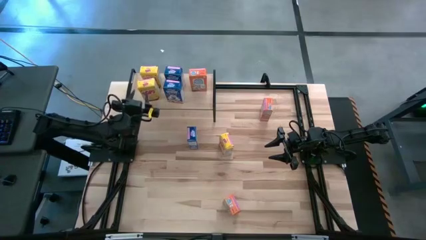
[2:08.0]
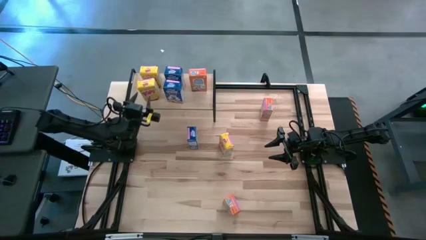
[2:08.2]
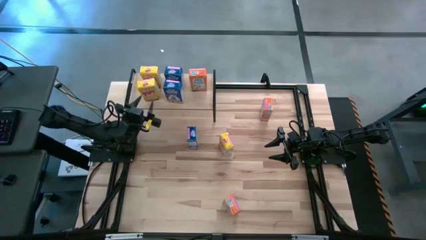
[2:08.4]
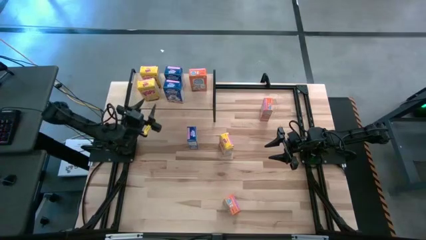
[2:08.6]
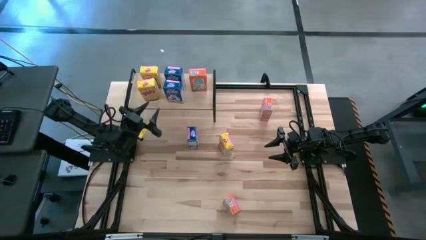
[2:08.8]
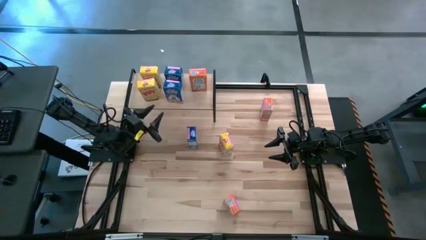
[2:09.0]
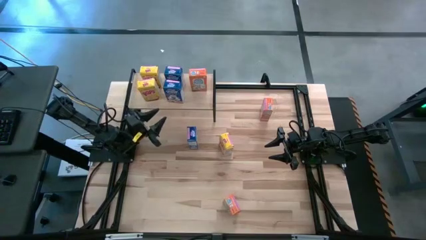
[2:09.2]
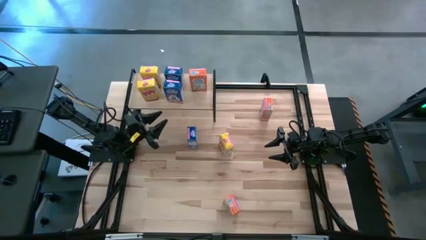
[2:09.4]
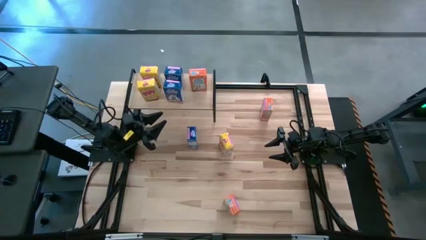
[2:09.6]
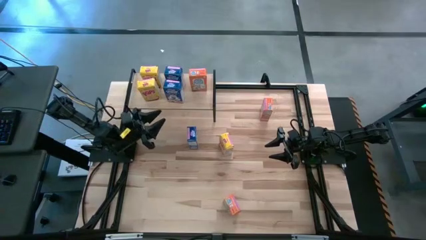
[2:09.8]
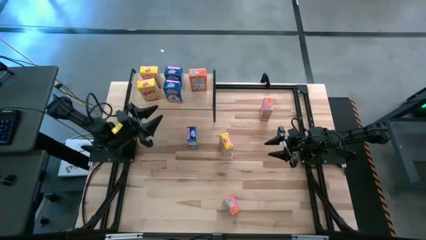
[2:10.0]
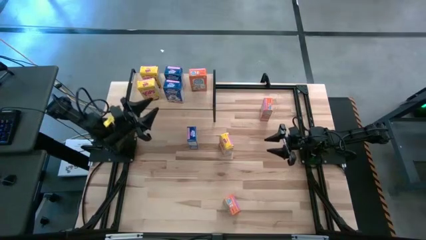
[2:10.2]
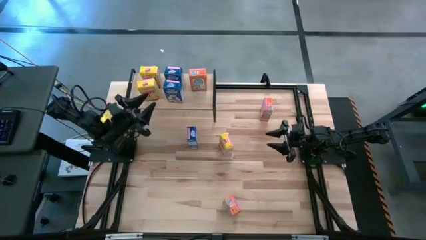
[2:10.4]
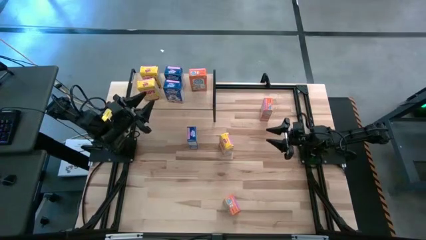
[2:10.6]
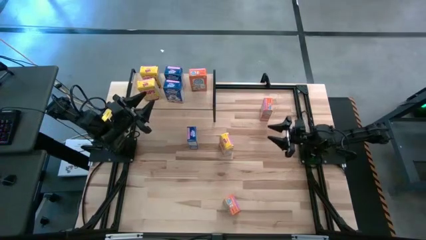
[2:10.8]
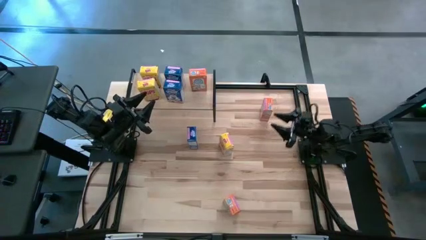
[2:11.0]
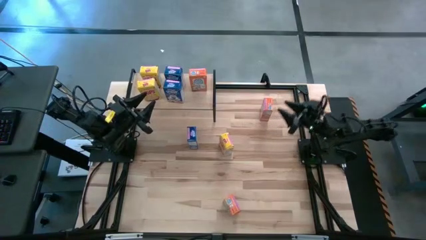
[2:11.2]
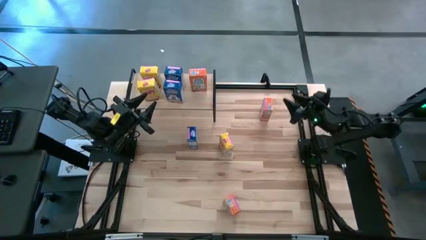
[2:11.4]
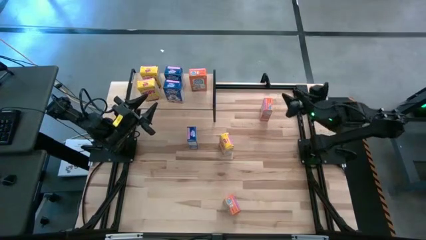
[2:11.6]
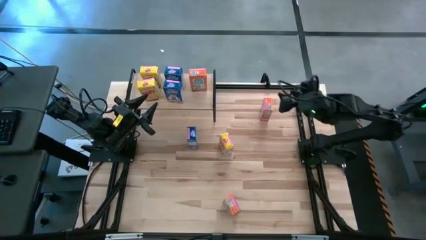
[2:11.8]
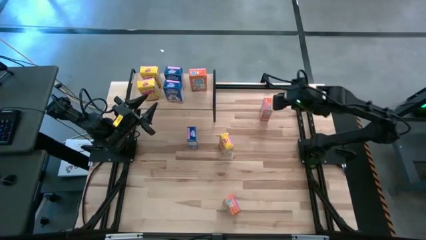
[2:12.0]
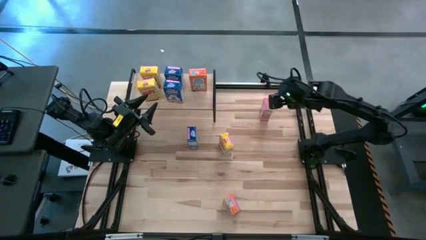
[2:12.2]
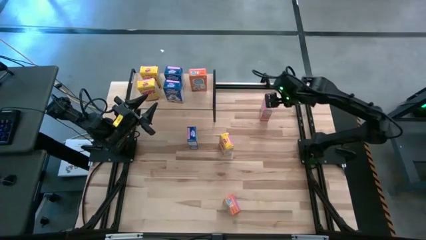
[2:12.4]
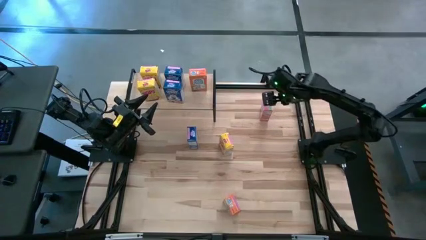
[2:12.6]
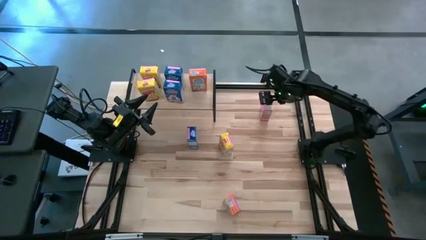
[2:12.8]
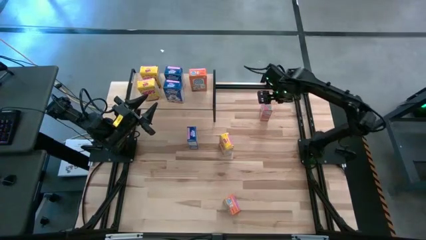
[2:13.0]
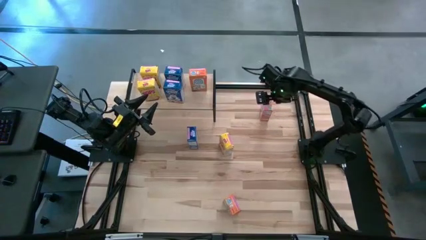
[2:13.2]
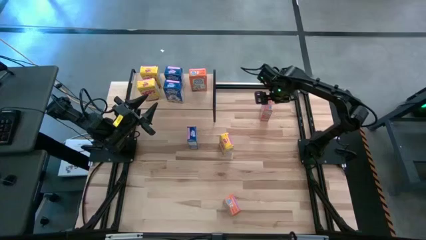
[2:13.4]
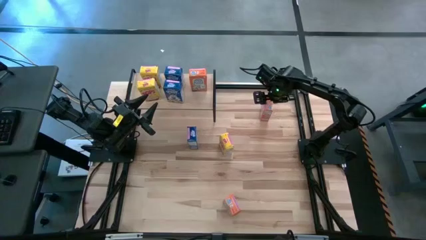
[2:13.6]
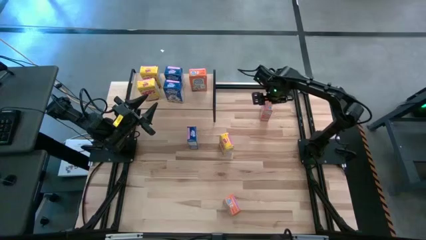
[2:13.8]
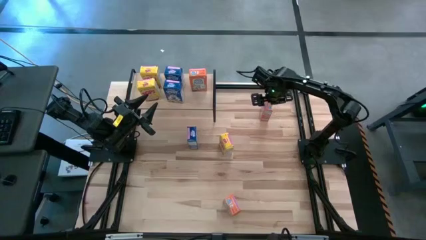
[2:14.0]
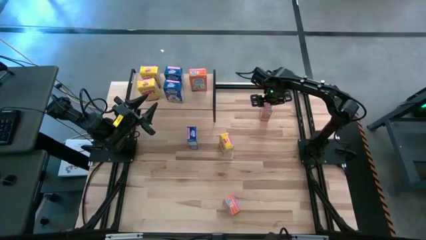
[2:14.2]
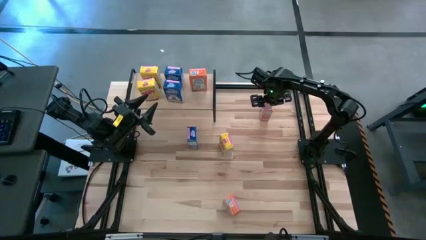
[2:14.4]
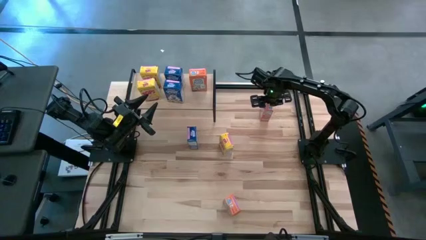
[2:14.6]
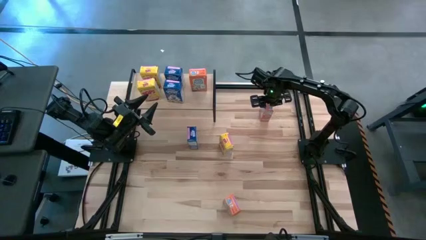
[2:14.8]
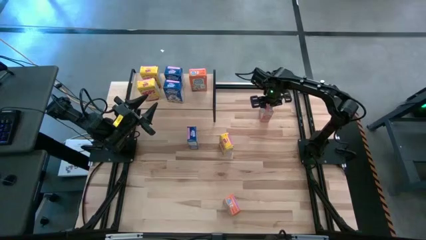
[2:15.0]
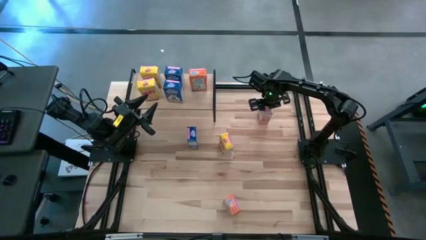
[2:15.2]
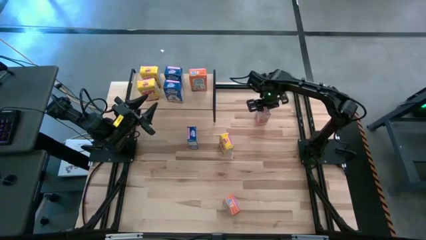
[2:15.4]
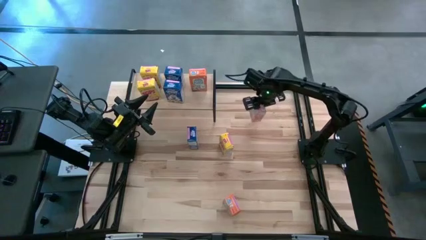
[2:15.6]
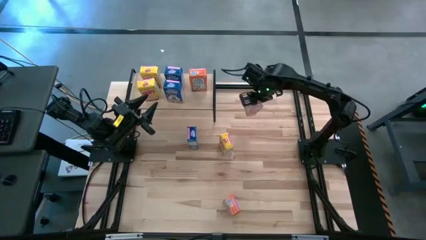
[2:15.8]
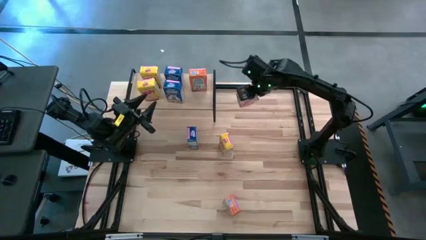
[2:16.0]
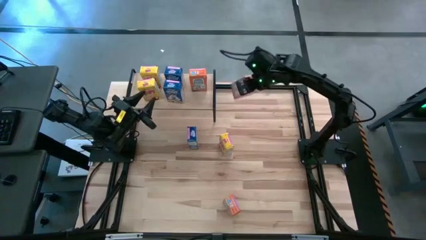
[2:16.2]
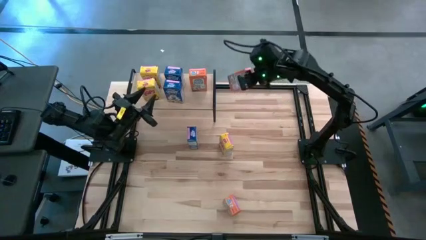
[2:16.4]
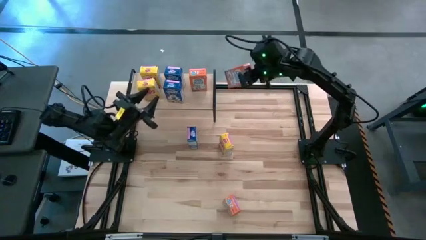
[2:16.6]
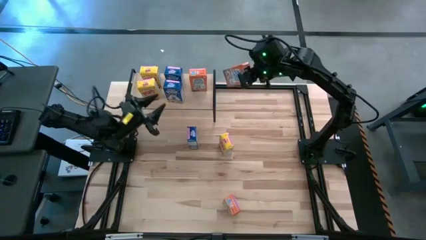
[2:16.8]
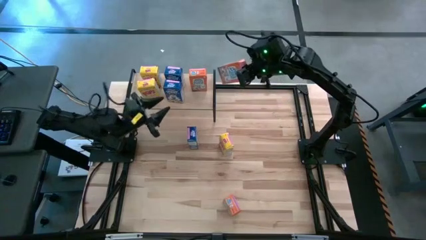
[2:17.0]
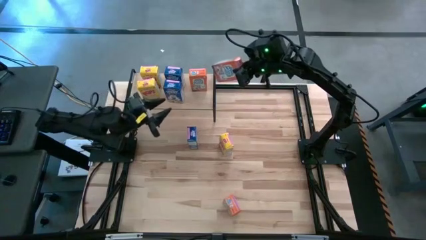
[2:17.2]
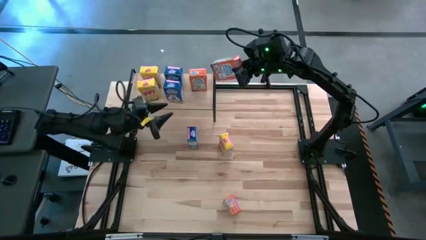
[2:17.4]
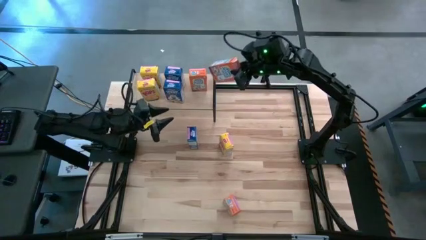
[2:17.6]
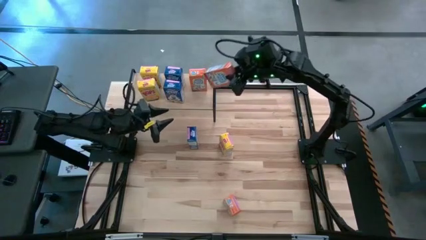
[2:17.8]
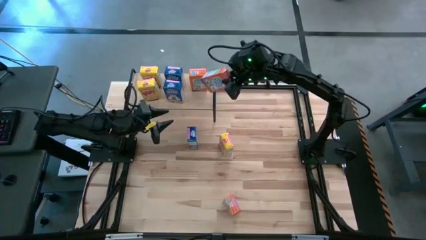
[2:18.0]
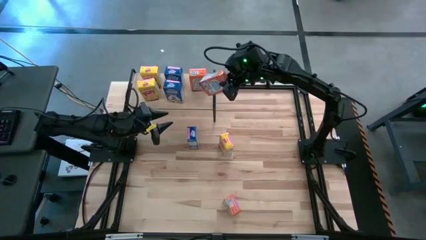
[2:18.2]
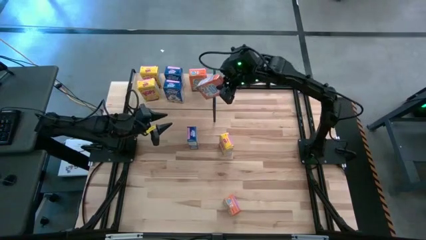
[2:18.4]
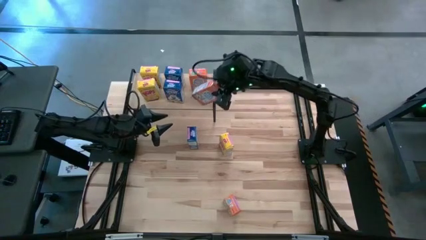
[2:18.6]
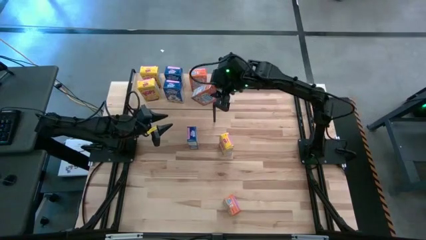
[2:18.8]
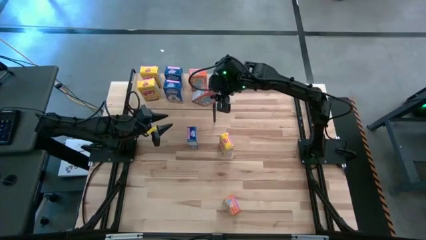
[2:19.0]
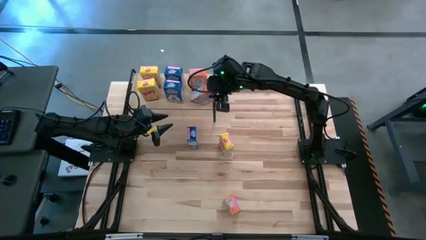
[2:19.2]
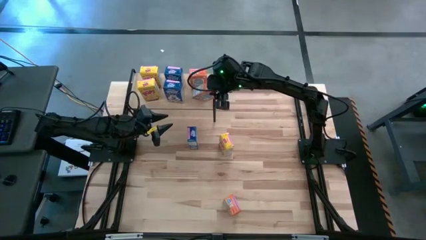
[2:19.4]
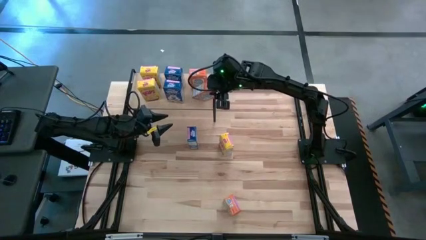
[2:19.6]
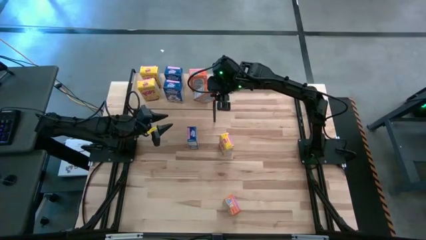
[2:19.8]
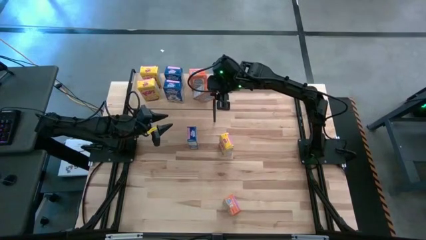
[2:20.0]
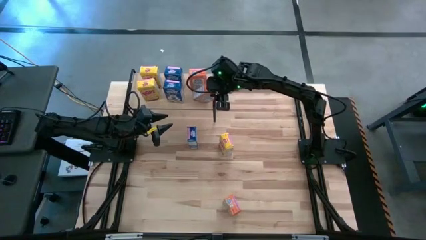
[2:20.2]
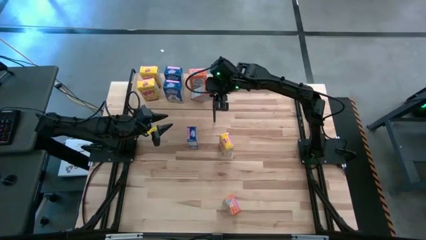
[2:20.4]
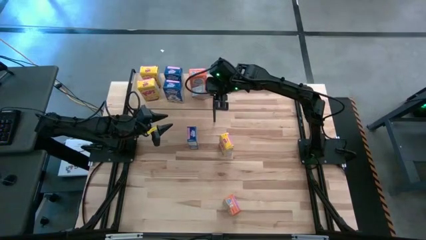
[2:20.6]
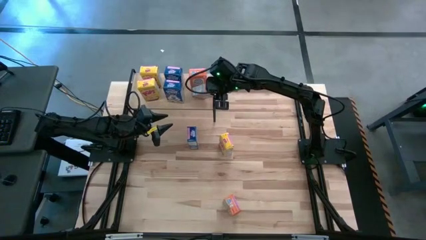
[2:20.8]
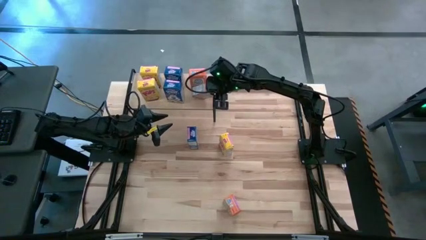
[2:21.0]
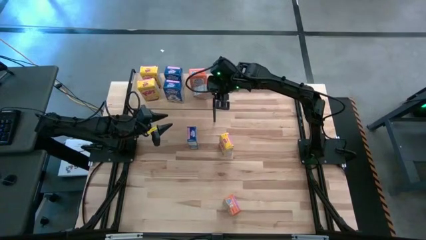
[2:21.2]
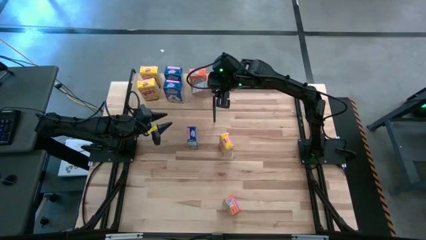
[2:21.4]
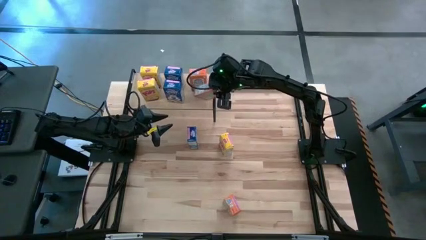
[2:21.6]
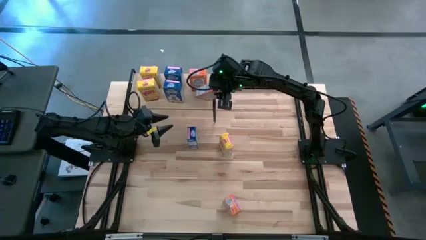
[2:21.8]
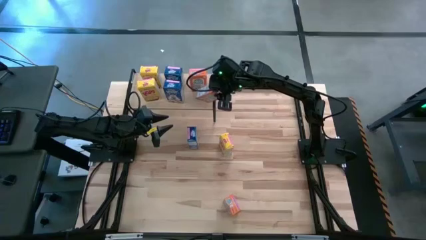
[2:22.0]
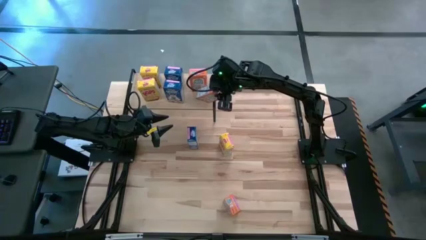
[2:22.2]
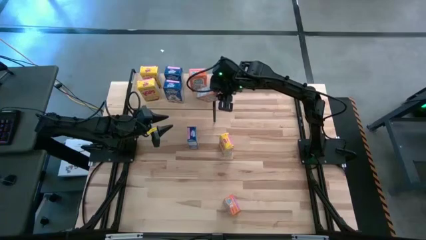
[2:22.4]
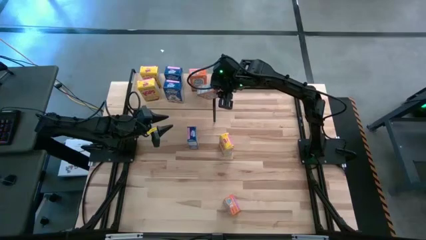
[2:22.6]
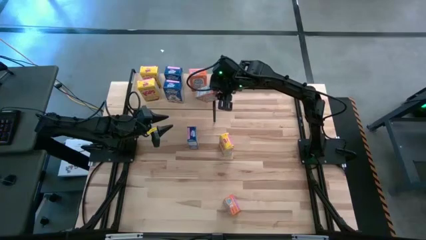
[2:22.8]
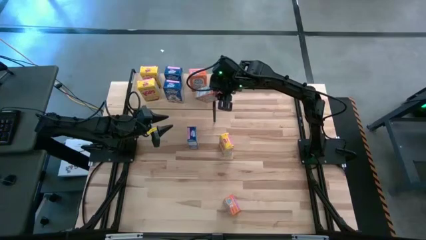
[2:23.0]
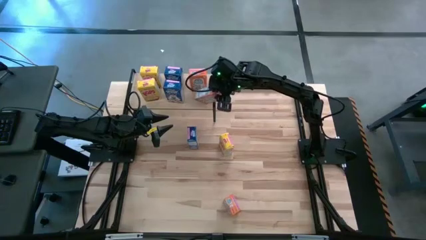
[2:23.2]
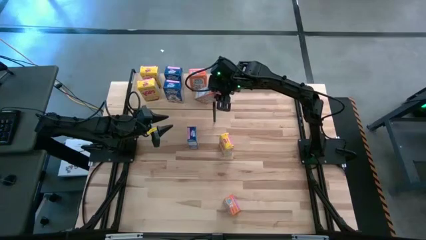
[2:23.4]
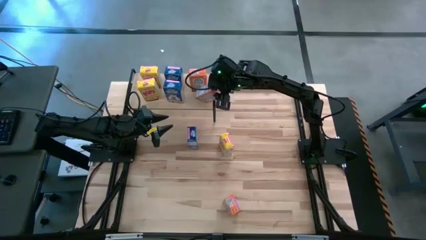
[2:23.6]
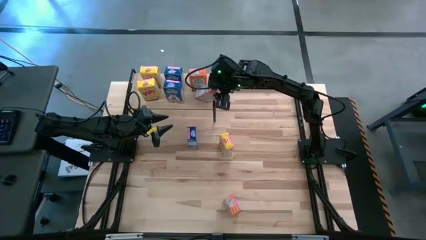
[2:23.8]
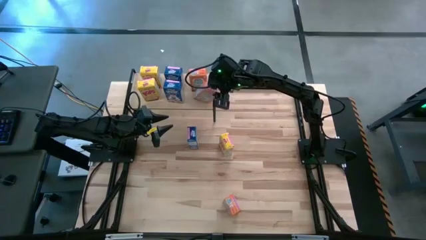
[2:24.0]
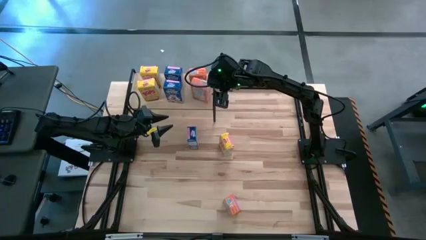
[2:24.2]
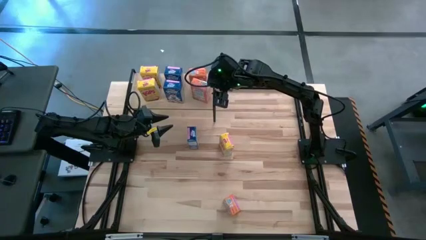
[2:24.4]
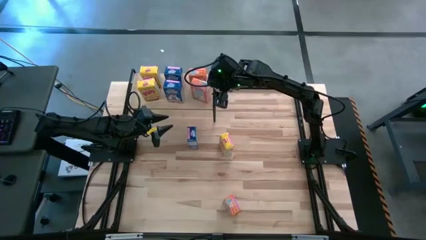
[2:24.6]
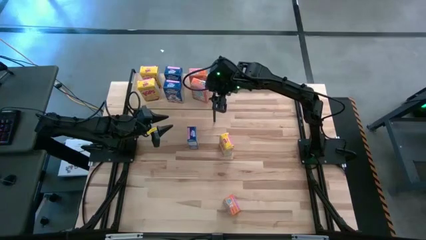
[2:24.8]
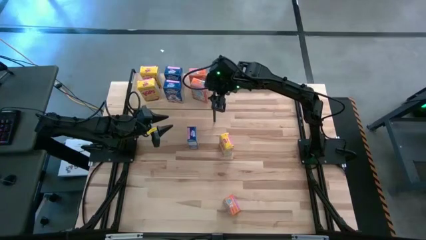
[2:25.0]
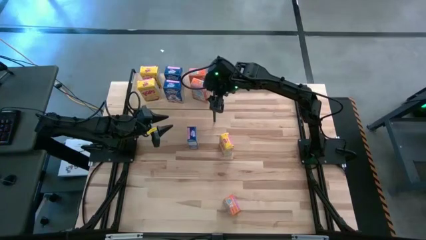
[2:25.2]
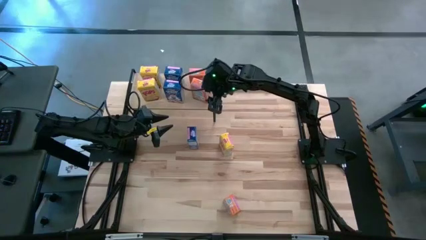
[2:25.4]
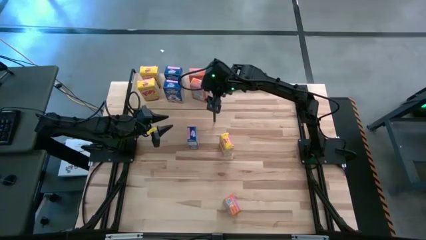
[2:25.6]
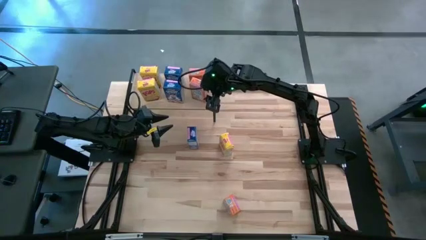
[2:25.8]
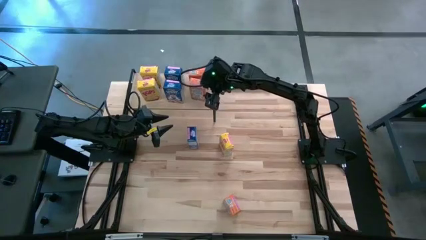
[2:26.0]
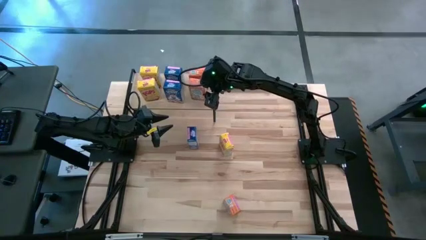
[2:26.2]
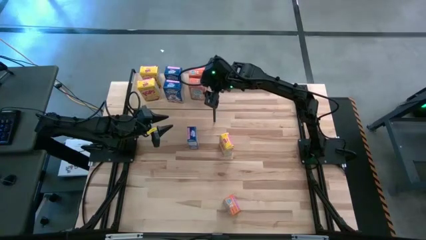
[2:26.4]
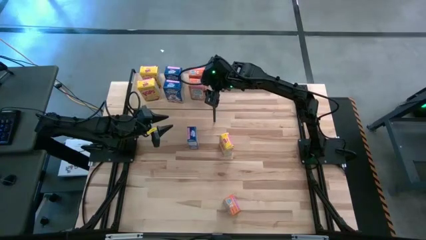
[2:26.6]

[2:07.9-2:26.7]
Task: Stack cereal on shelf
Put the top orange cereal box on the shelf aligned with the other orange cereal box
